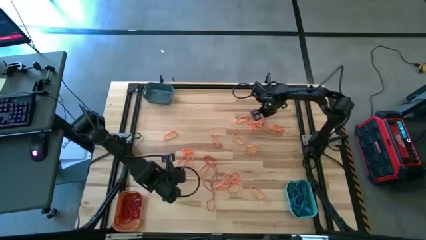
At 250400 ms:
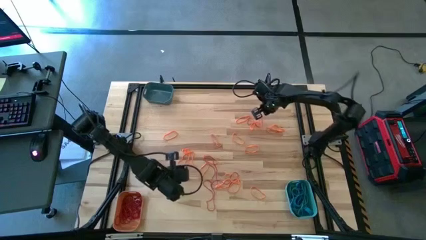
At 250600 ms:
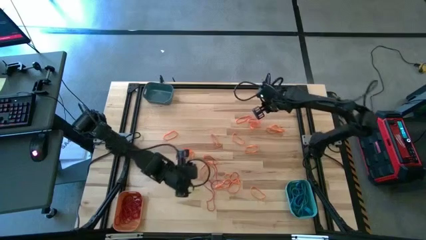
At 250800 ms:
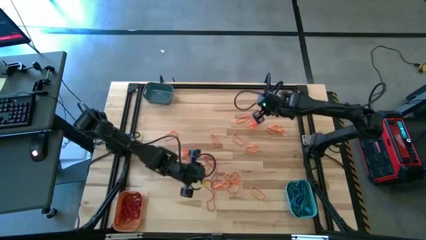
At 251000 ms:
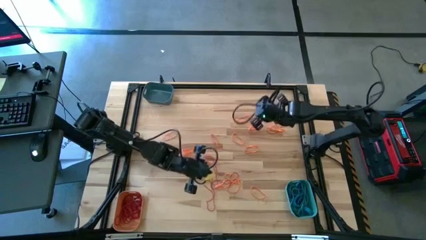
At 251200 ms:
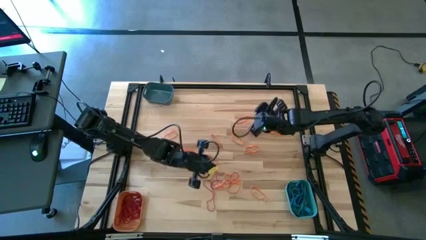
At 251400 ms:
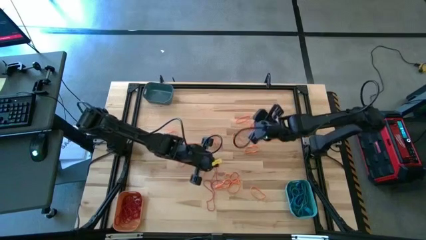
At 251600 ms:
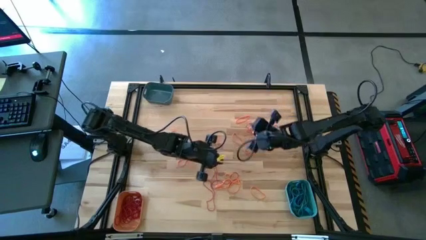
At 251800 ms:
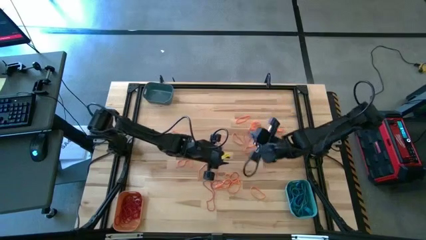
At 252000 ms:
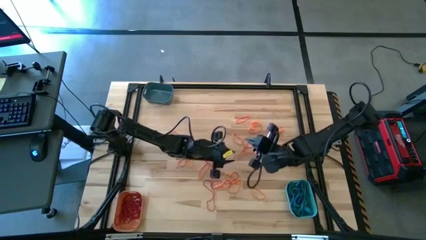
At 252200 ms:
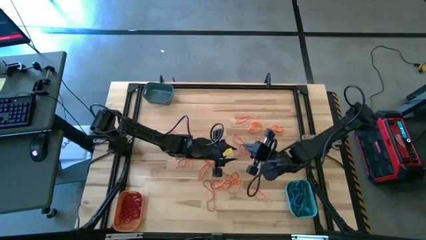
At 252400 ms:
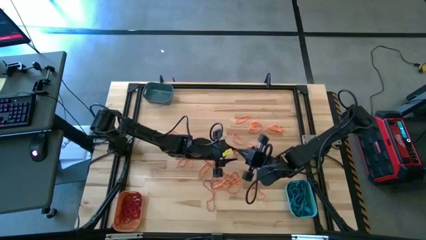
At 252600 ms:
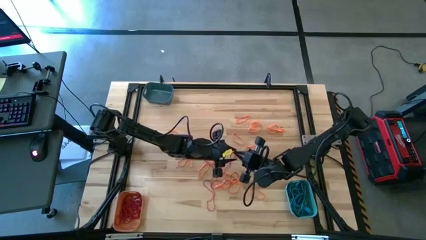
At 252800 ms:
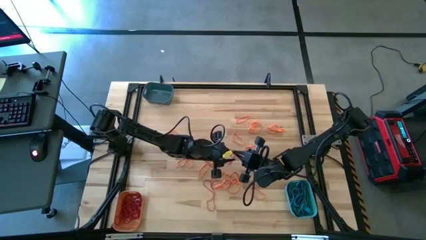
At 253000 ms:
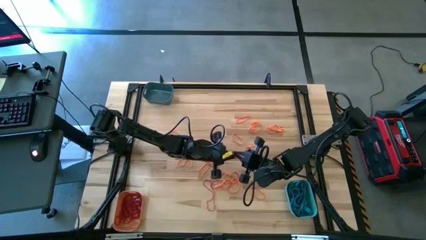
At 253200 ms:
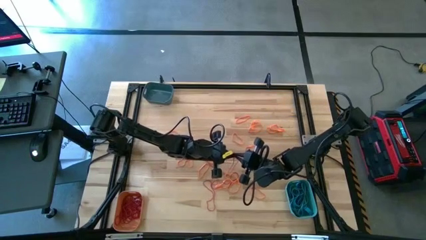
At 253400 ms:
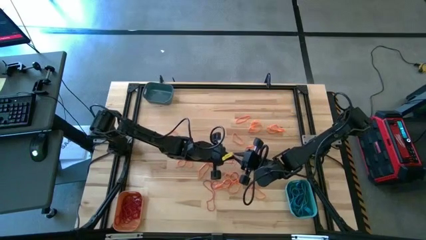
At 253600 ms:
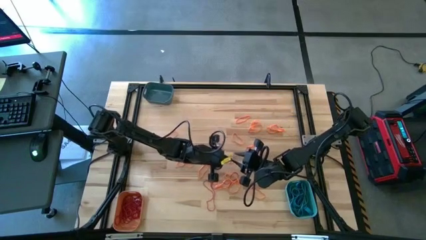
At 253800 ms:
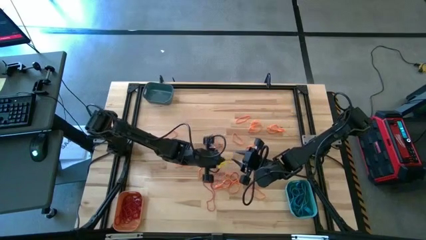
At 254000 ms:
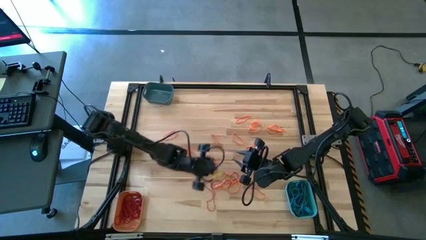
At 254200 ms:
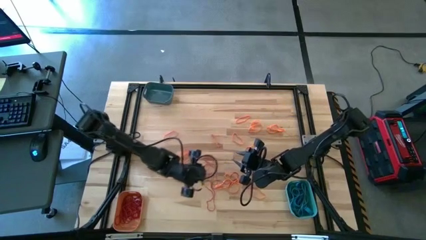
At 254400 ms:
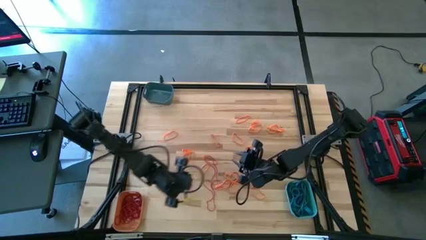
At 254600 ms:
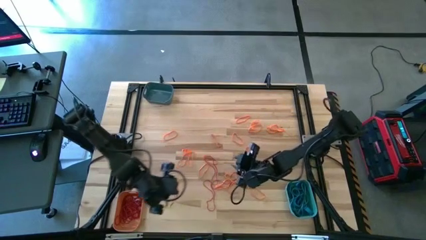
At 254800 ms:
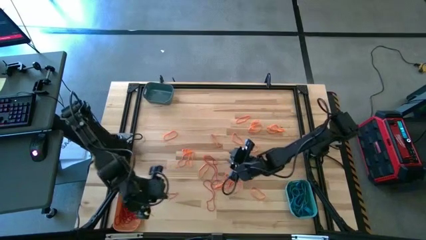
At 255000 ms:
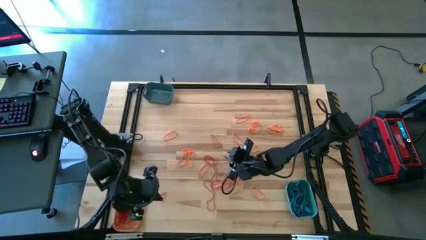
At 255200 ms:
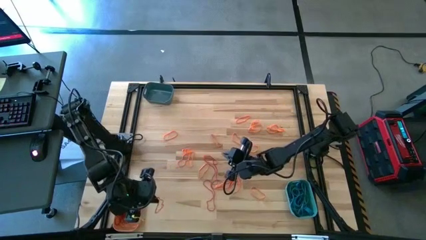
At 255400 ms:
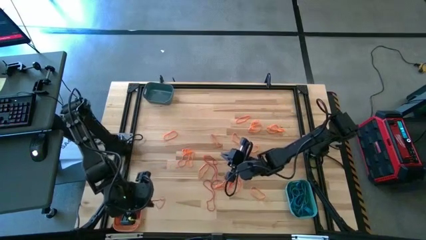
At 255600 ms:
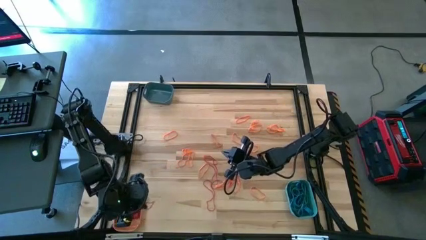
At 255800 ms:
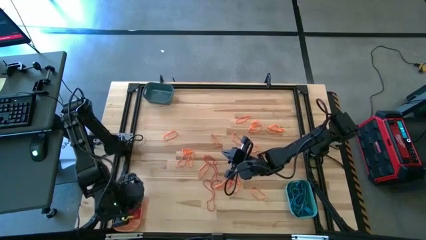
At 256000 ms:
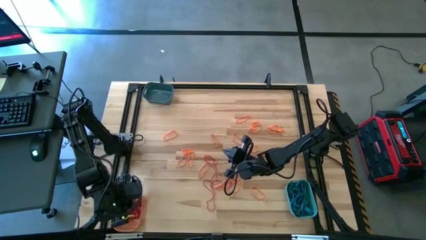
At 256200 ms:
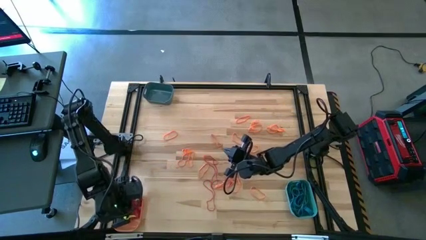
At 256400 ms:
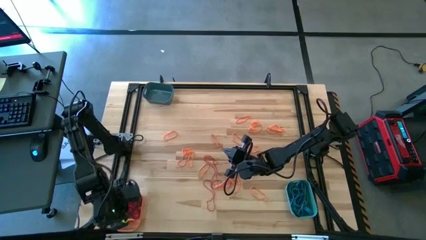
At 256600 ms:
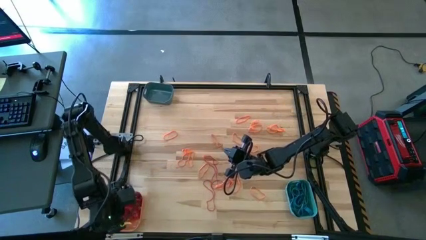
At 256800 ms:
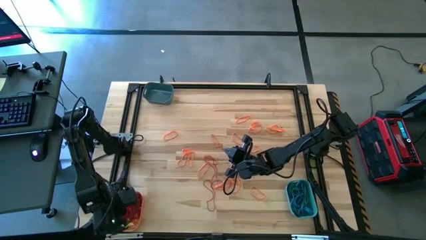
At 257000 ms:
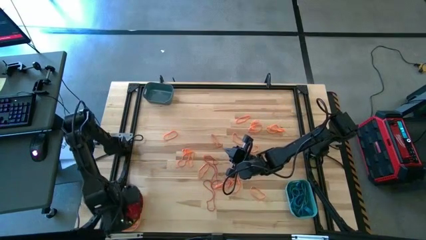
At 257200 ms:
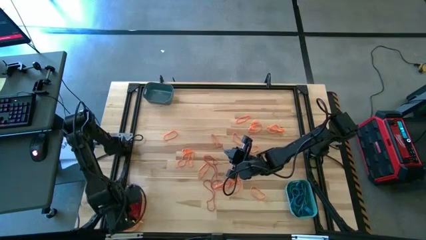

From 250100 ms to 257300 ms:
Task: Sort rubber bands into baskets
Put the red rubber band into the orange bin

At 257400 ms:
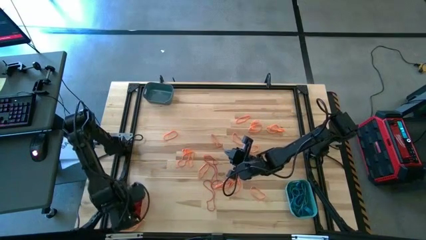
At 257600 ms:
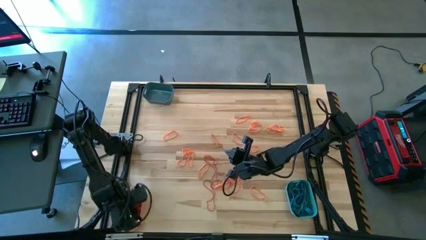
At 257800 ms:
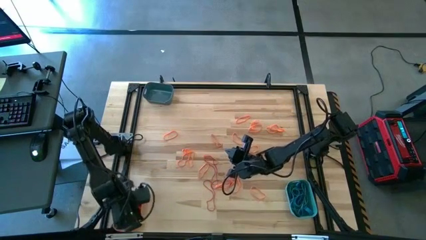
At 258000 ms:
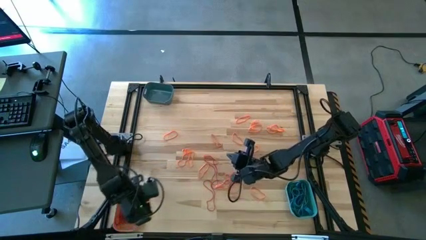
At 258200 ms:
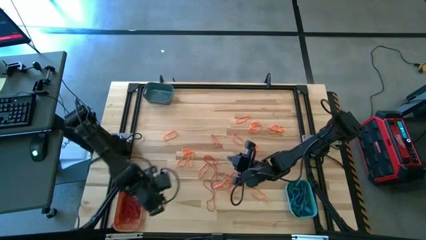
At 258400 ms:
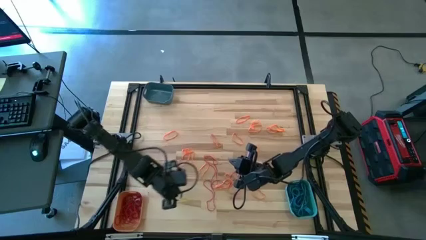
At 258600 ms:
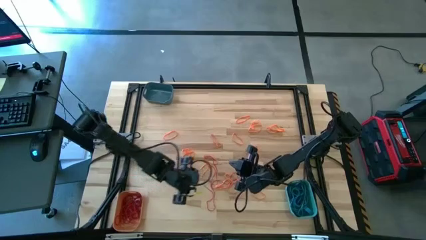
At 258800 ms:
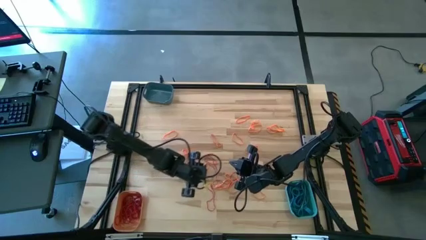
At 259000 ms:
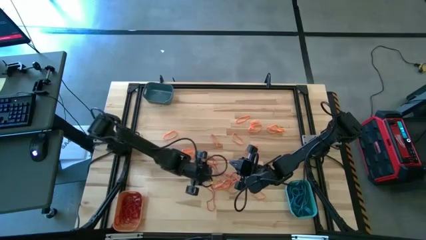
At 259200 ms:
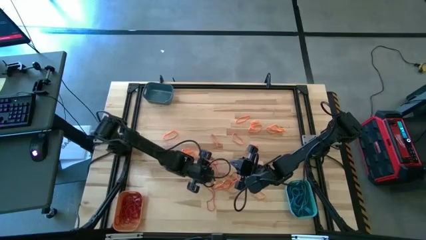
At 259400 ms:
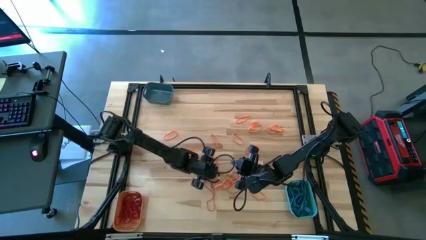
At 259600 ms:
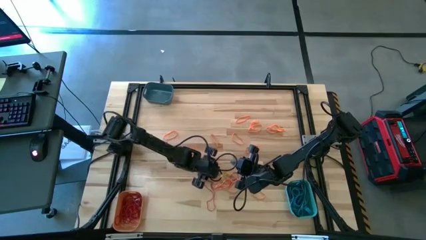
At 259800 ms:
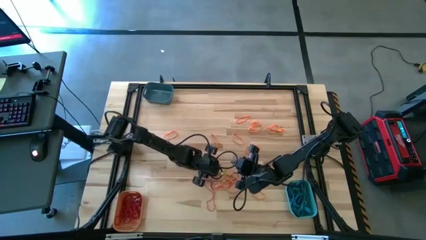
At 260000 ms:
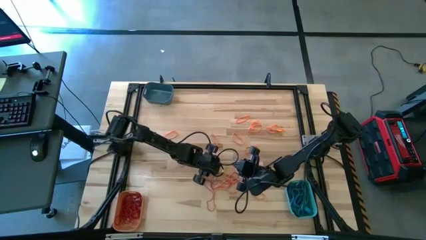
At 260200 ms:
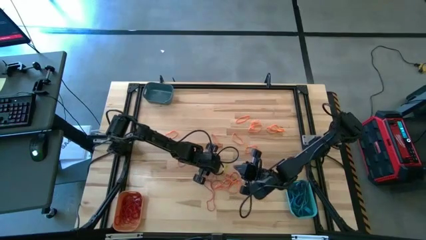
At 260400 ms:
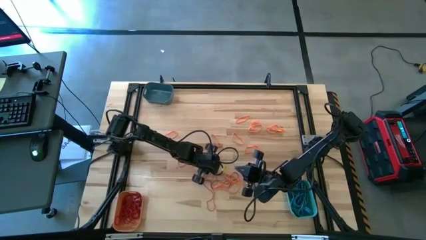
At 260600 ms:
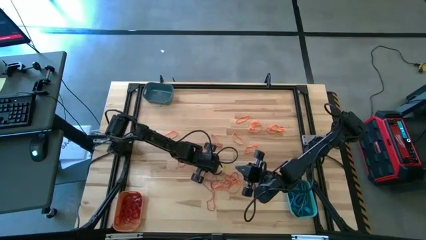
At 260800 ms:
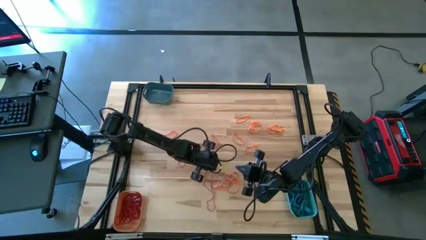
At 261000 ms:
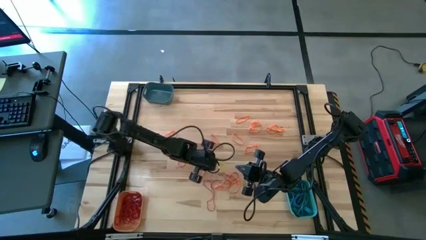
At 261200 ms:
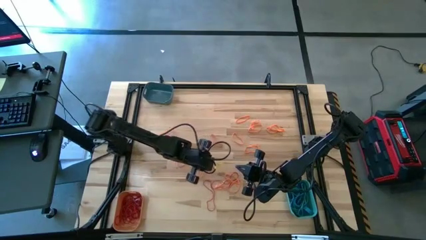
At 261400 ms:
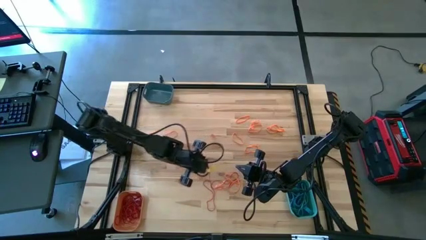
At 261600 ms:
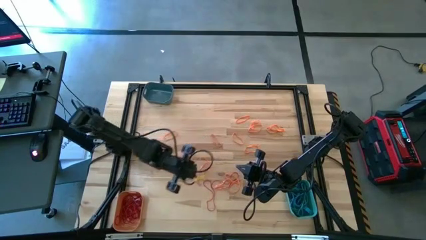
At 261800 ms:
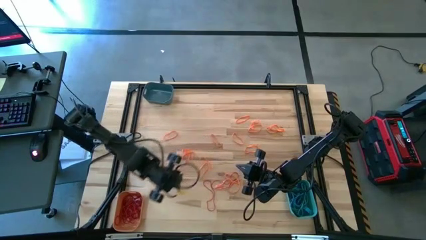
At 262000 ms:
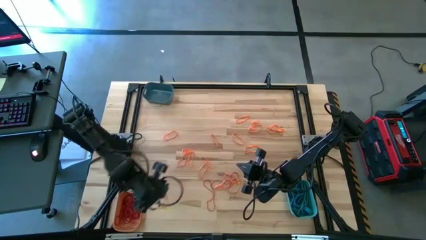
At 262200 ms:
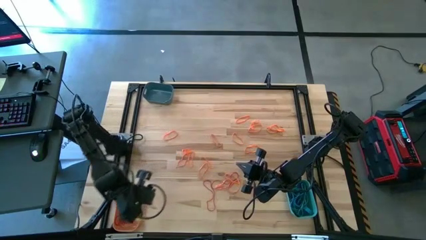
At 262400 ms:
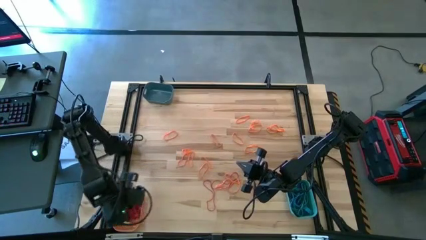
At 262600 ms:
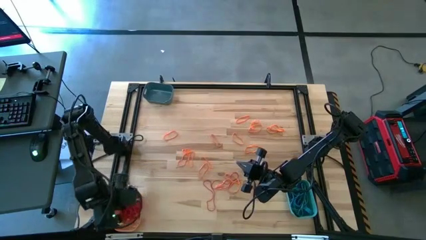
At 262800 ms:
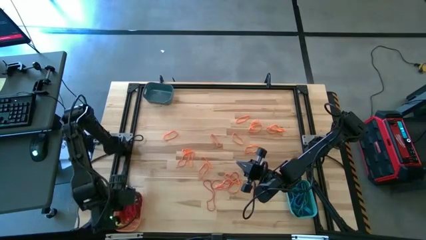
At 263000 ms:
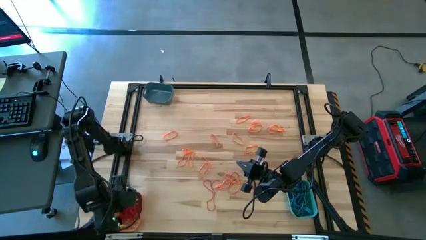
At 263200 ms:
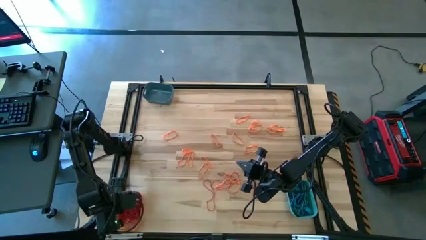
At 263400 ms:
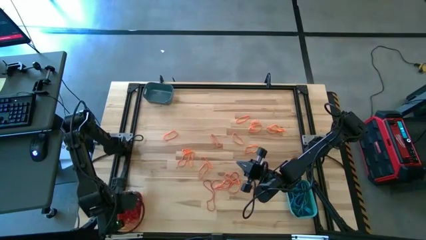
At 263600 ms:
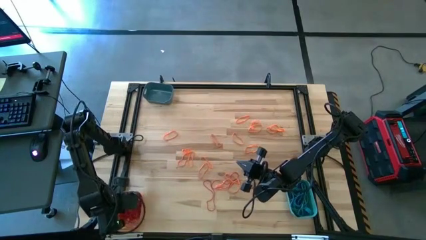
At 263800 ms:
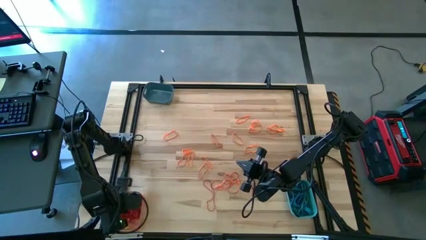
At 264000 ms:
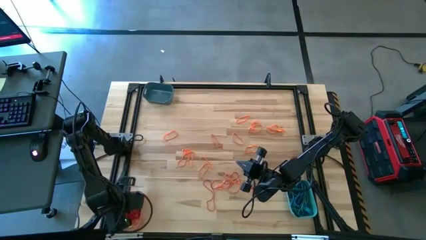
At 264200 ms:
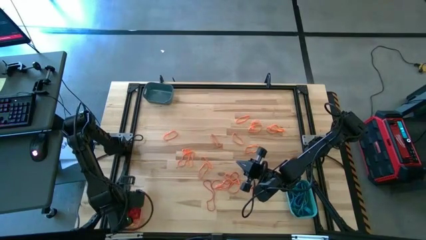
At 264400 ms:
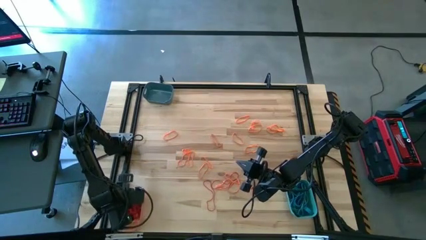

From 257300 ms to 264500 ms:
Put the red rubber band into the orange bin

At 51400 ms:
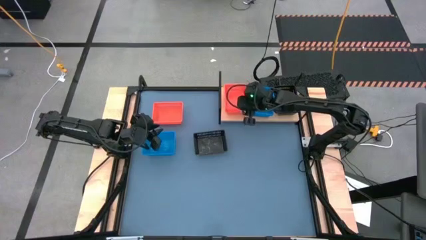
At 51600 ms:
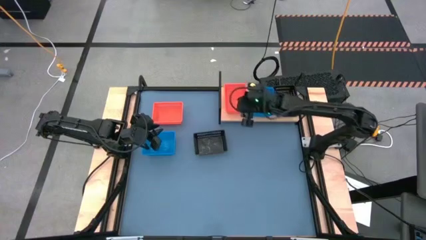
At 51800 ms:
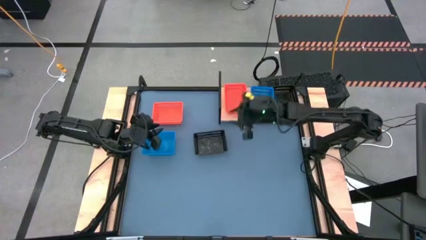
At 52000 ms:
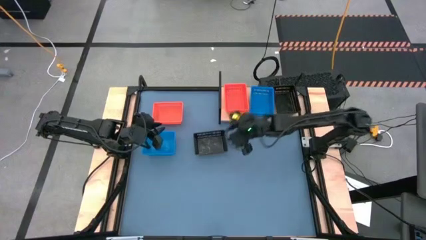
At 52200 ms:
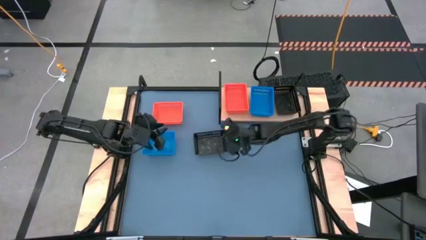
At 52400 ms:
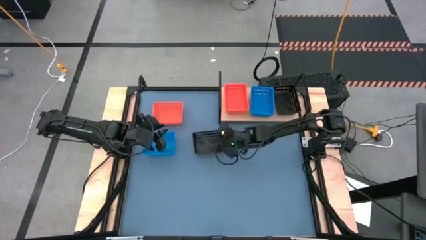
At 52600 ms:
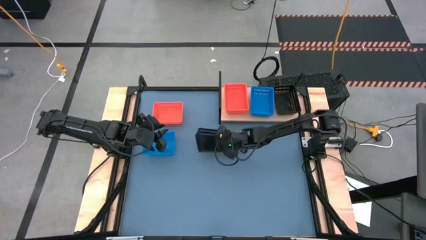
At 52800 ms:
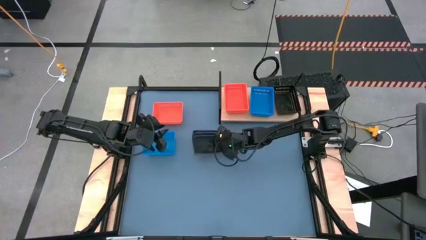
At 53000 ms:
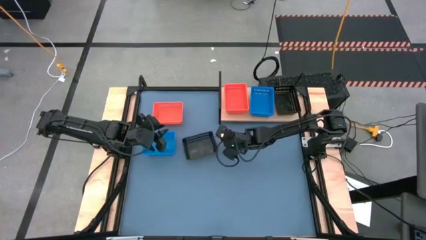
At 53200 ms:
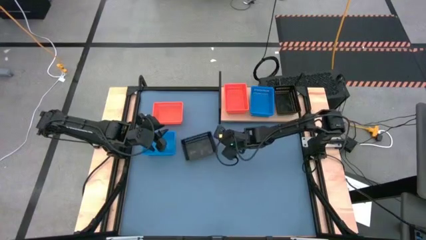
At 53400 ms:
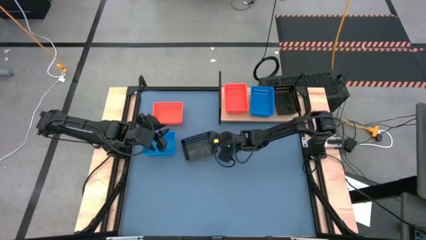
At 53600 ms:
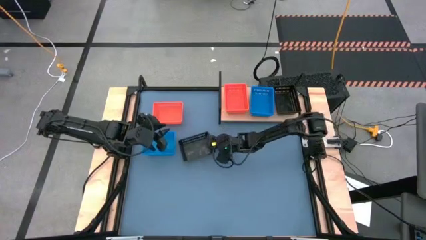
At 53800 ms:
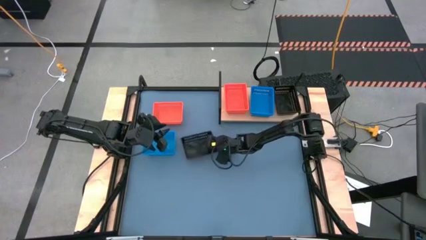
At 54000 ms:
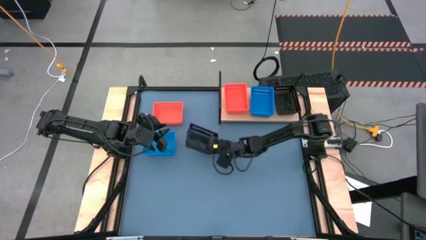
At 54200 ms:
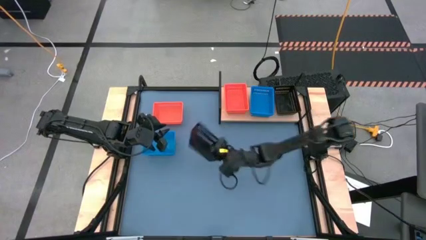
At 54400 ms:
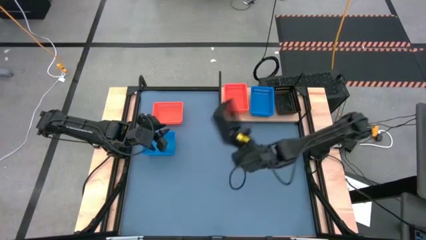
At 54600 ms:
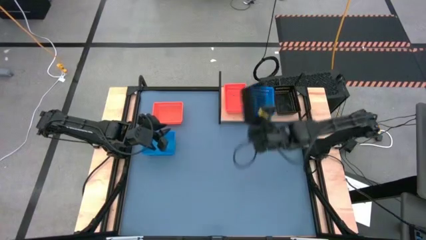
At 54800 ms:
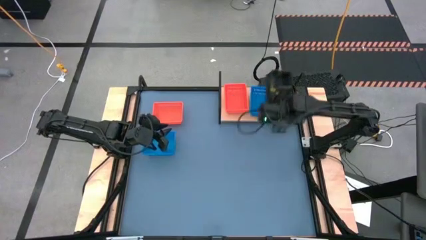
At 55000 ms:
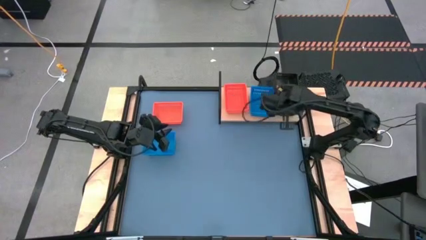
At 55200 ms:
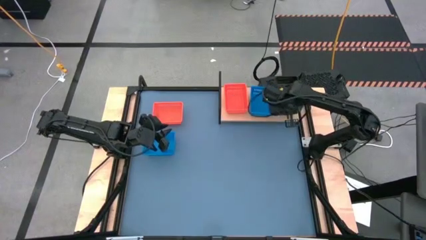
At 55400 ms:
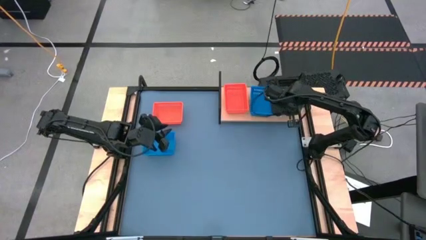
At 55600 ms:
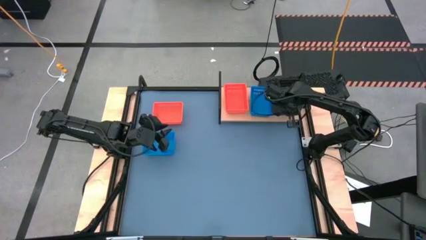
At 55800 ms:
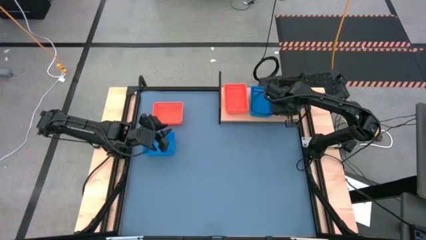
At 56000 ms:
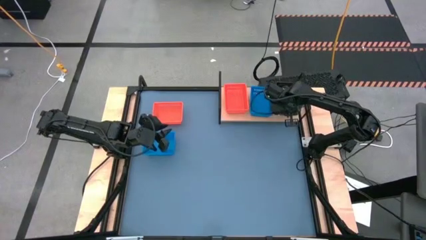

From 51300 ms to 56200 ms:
Task: Stack baskets on shelf by color
Put the black basket on the shelf
